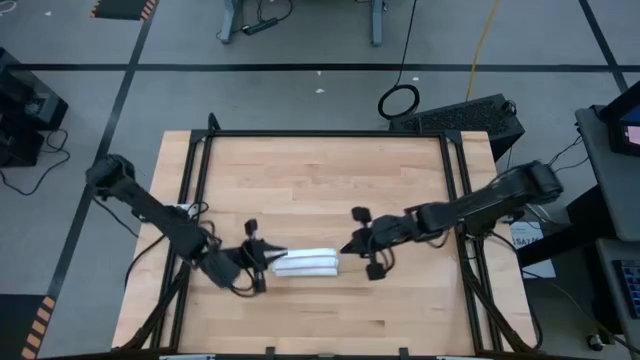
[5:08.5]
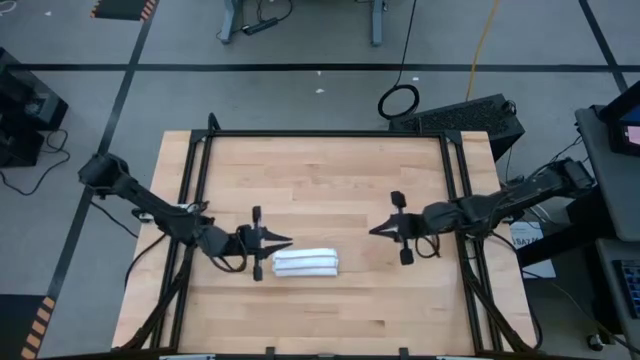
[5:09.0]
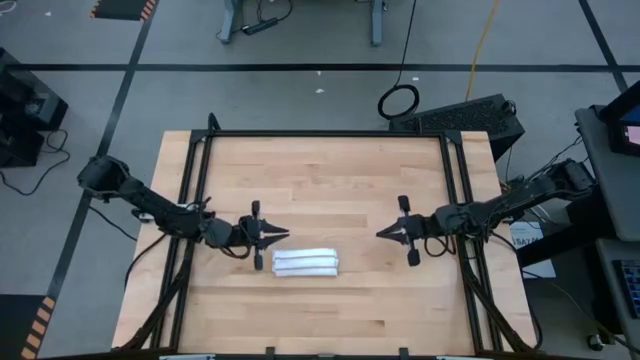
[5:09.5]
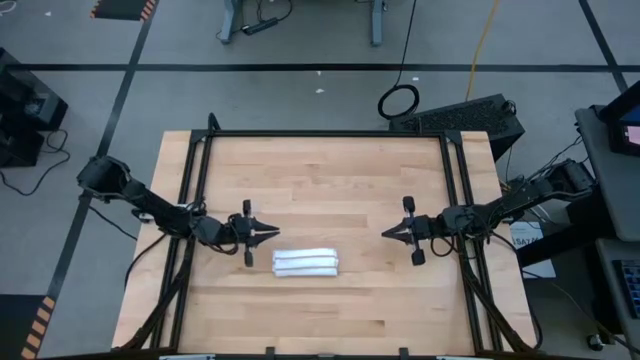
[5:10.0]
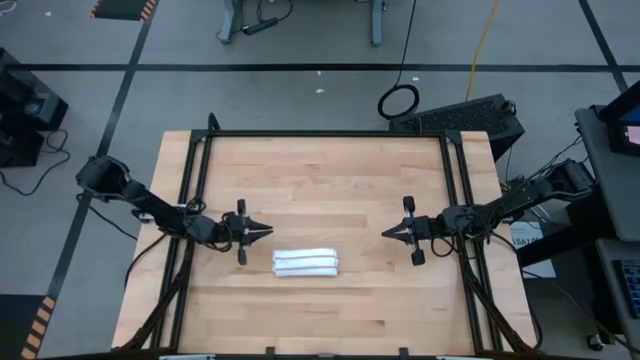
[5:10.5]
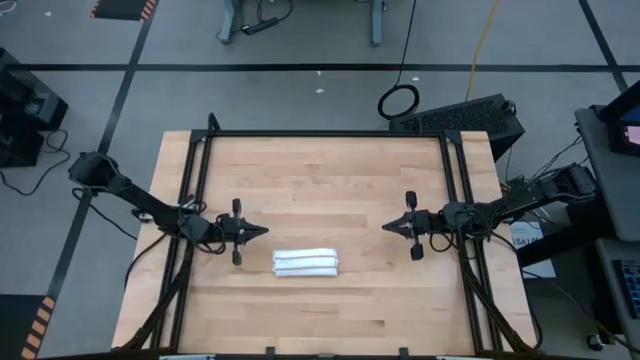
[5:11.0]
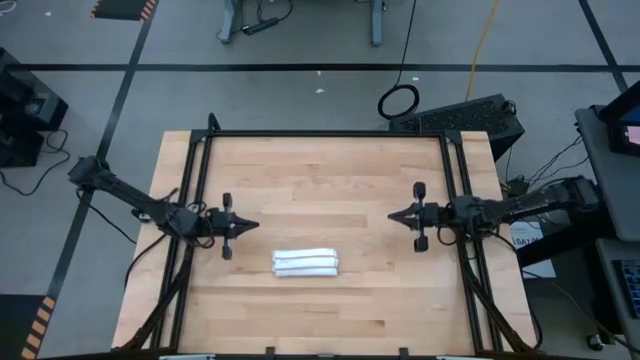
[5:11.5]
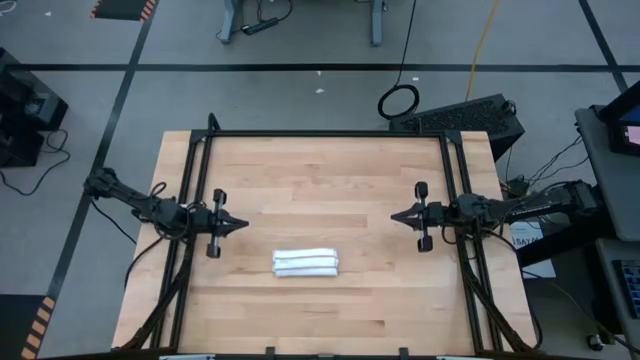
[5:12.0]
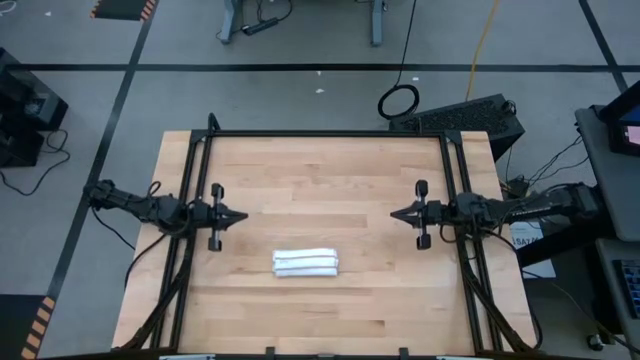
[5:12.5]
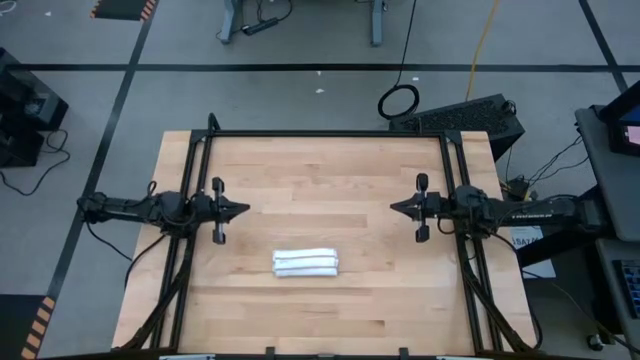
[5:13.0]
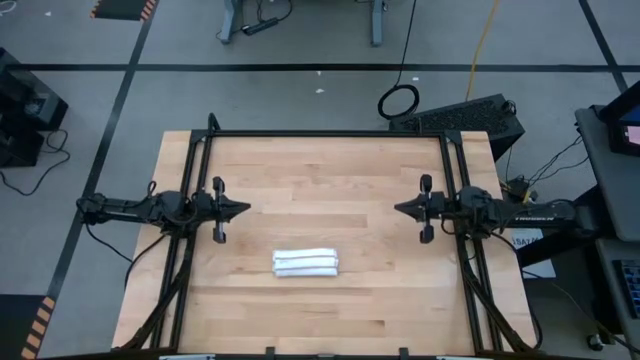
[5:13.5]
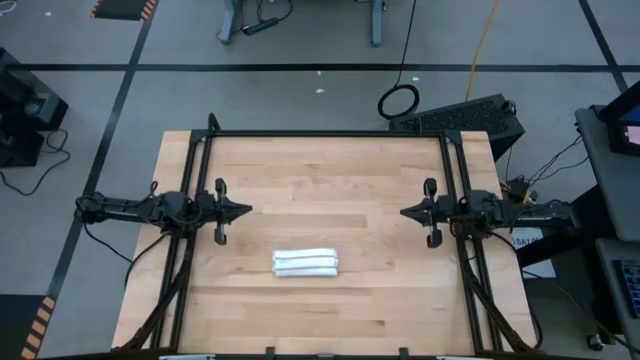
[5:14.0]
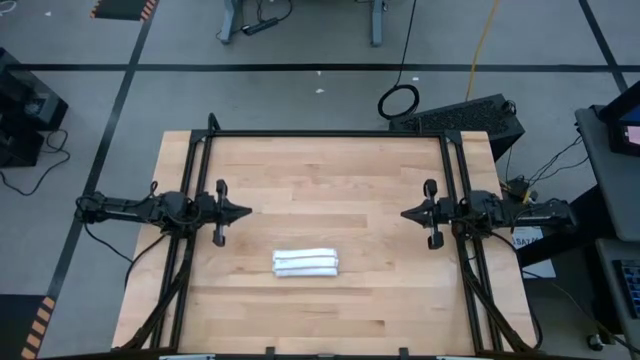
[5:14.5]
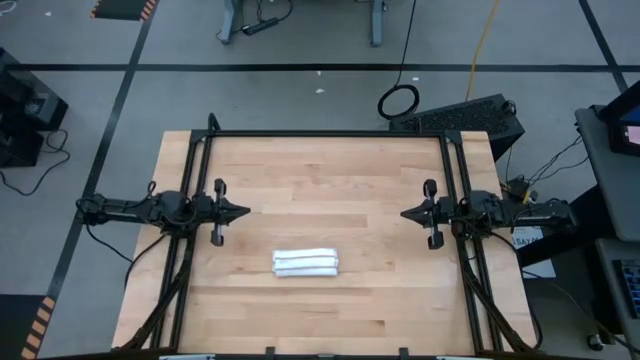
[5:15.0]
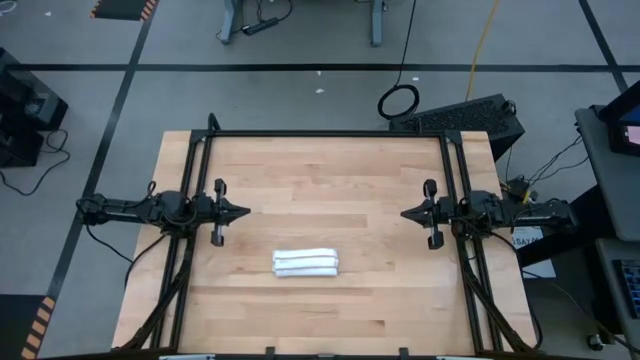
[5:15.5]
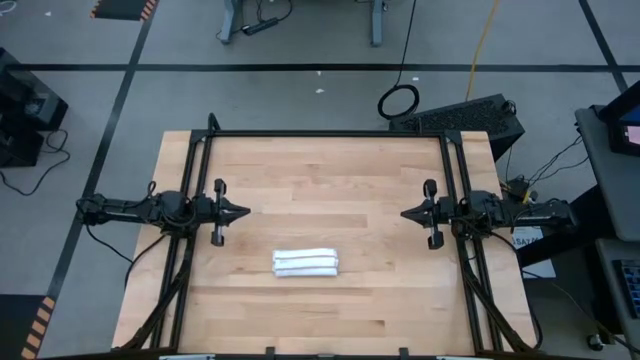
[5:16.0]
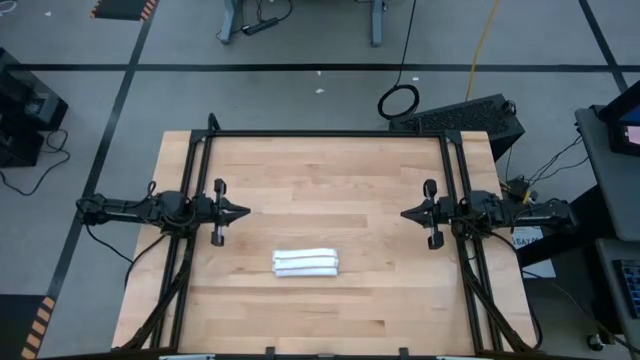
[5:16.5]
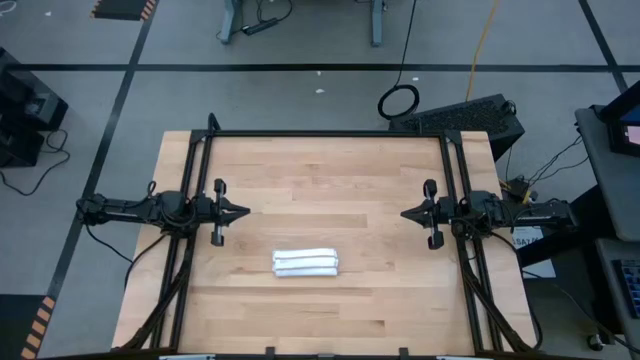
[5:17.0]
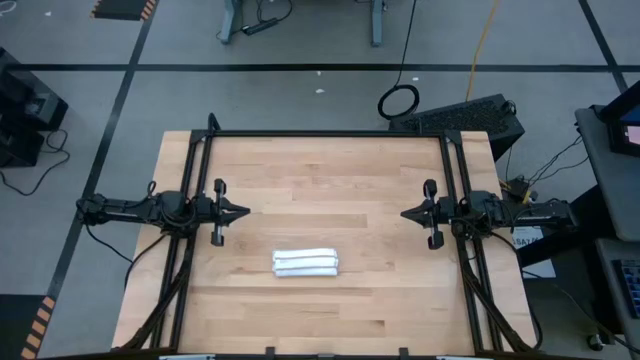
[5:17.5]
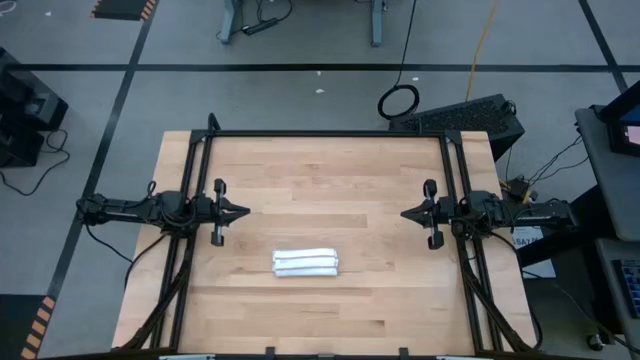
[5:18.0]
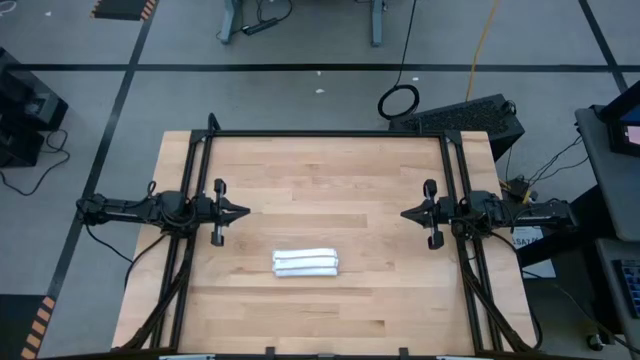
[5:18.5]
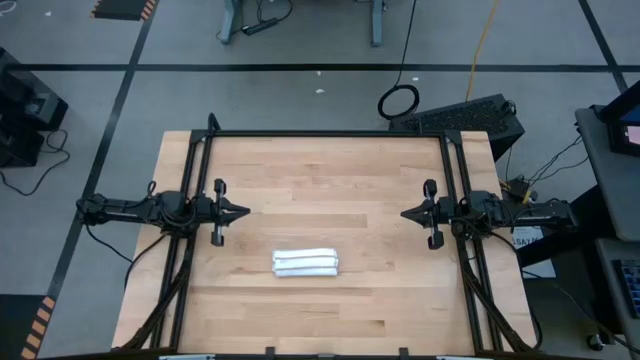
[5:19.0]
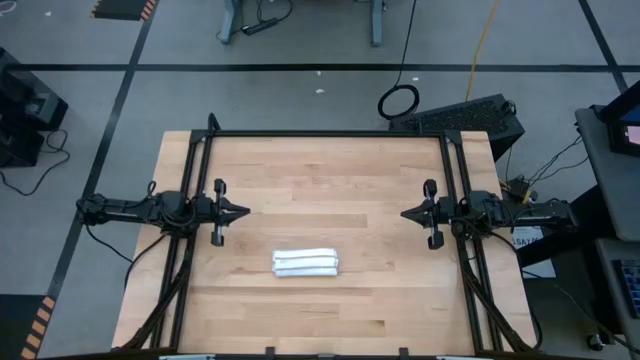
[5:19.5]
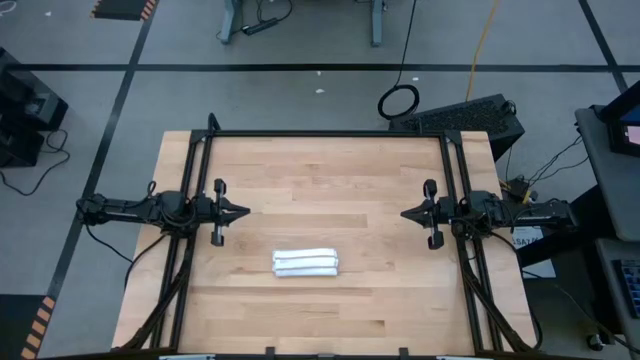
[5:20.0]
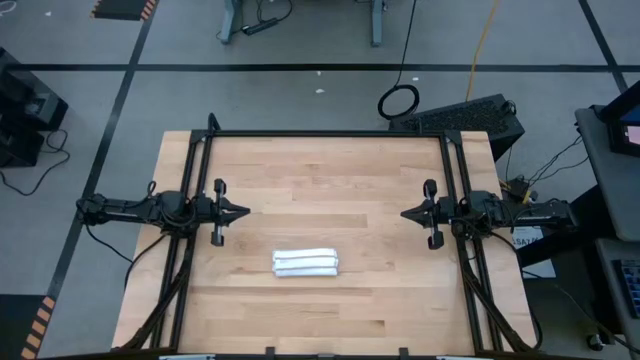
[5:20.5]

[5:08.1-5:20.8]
Task: Roll towel
Return to Home Position

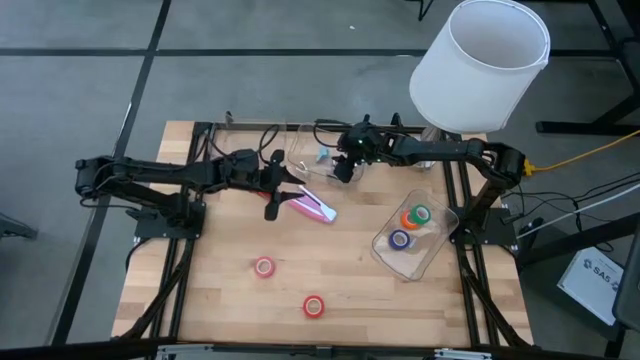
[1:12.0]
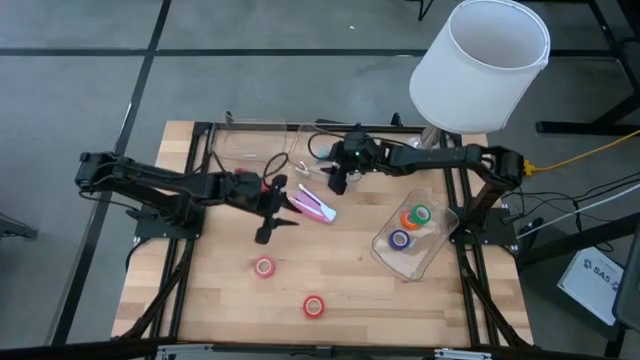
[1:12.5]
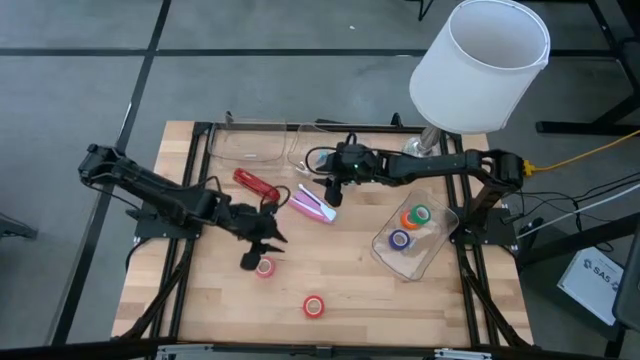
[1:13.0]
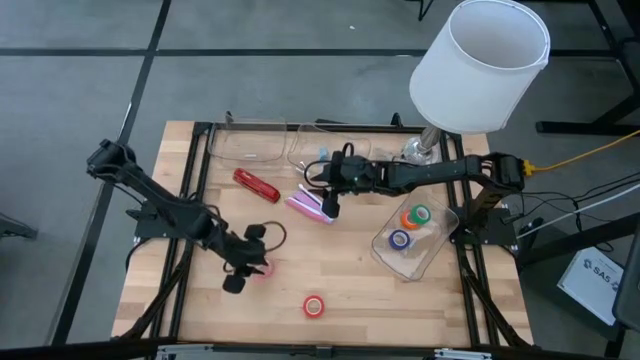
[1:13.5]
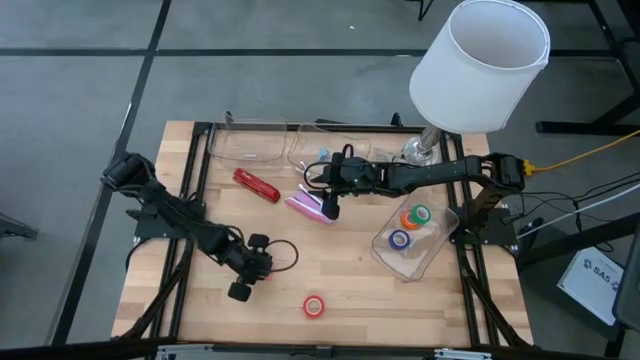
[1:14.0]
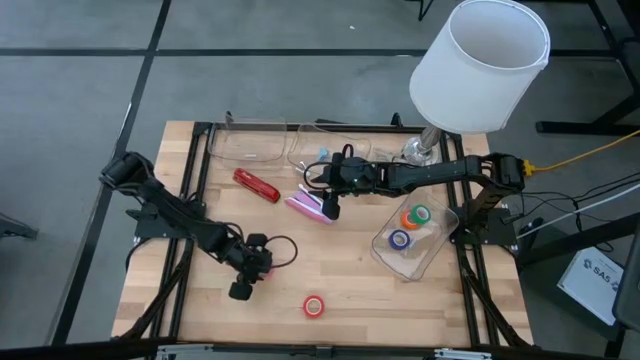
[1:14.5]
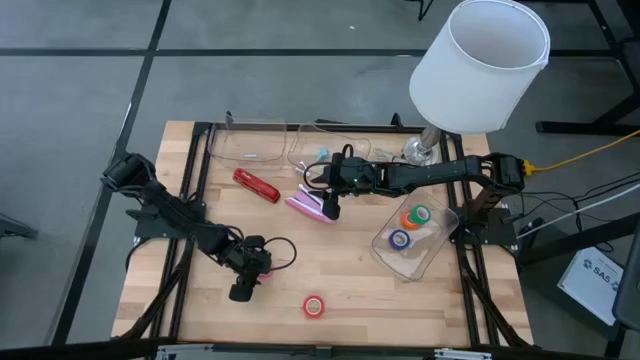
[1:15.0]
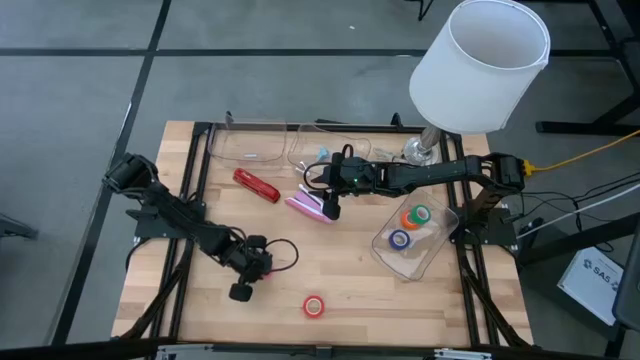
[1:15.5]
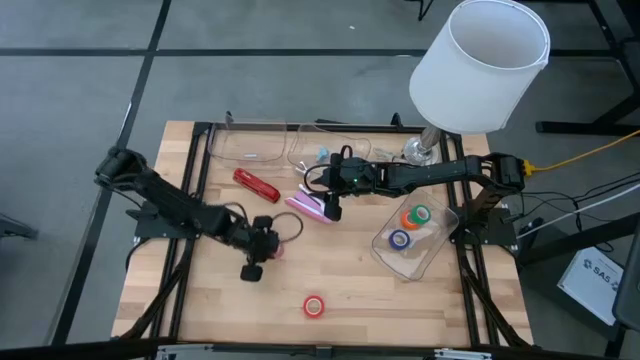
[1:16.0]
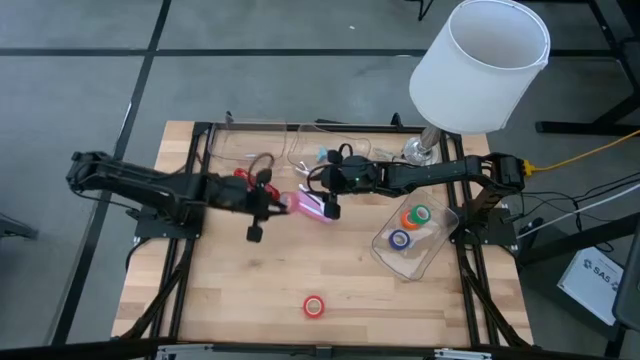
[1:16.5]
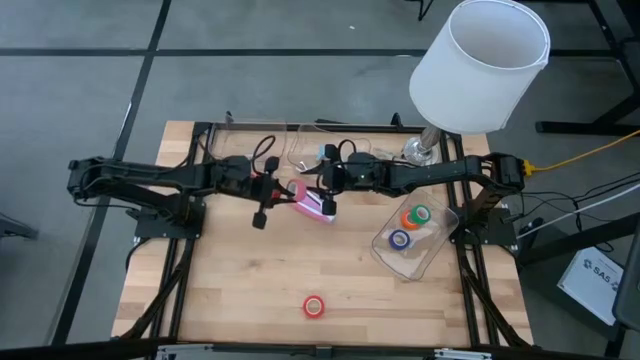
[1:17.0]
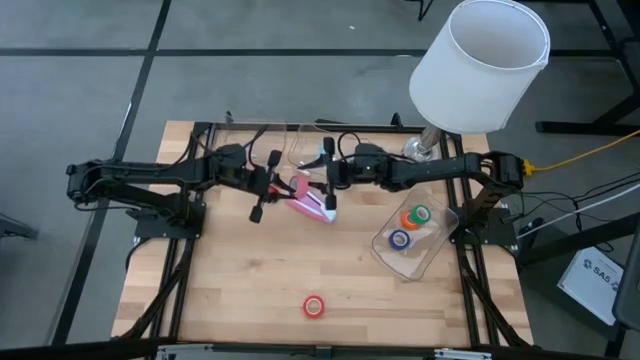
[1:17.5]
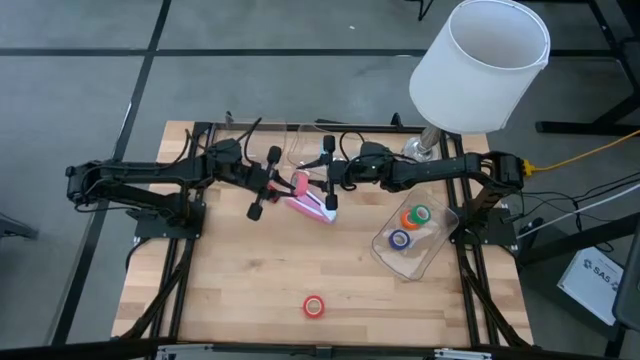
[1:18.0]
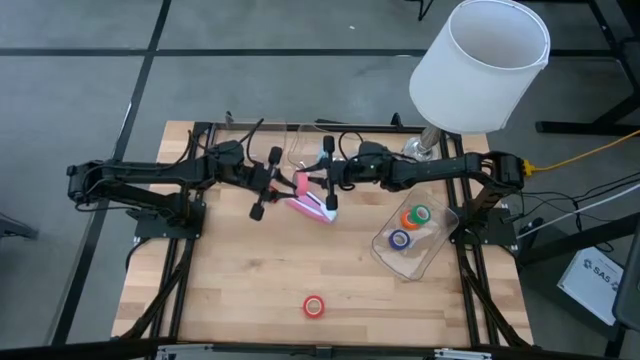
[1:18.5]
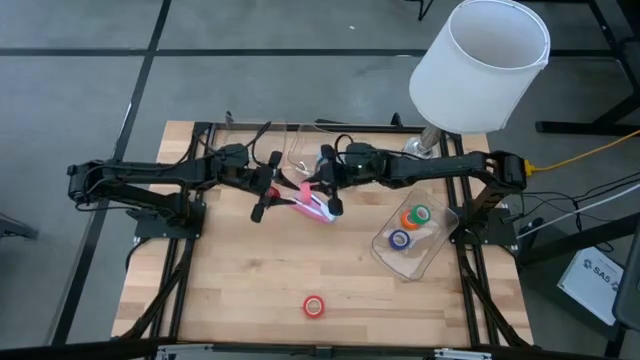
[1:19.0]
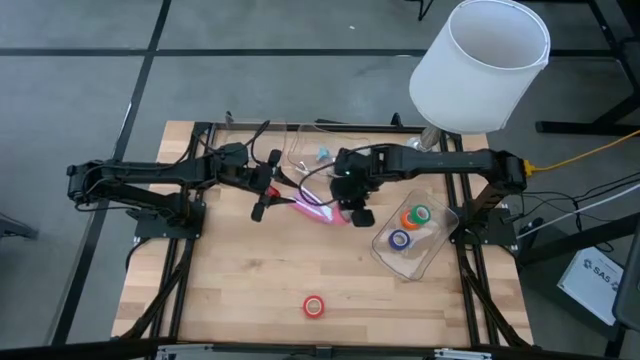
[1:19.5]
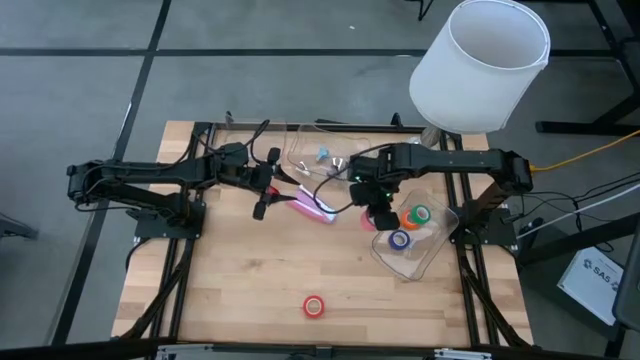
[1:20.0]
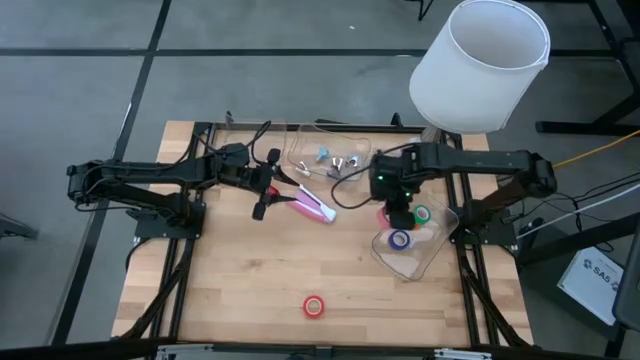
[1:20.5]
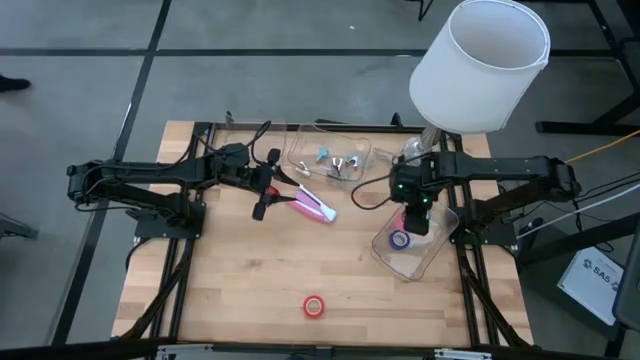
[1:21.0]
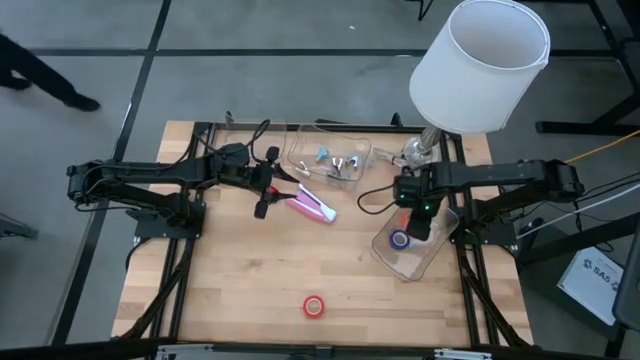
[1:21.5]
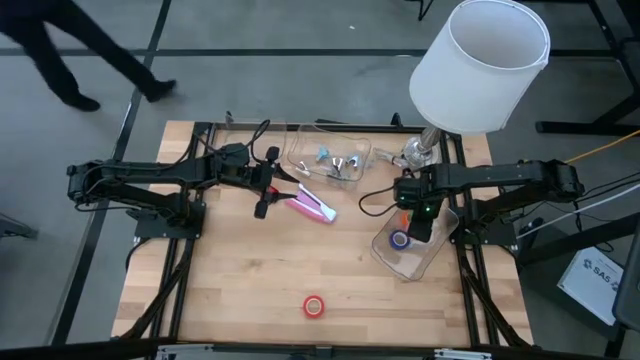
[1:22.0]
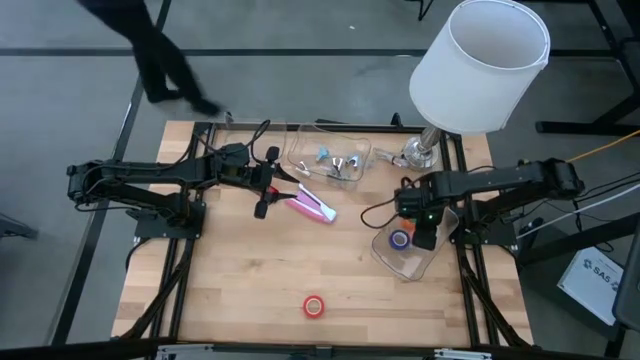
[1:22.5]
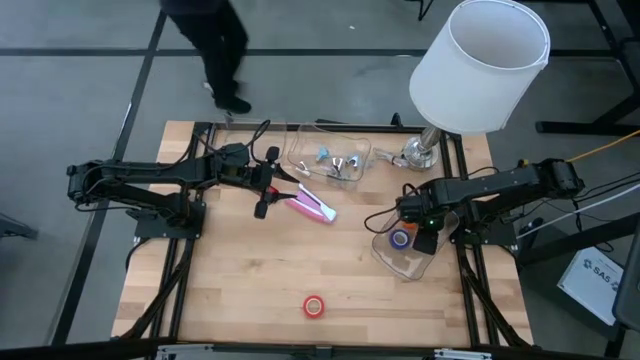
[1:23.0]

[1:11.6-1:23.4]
Task: Pick and place Stapler, Stapler remover, tape
Put the pink tape into the bottom transparent bin
